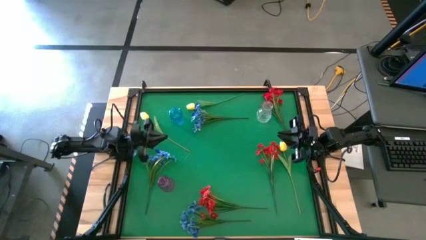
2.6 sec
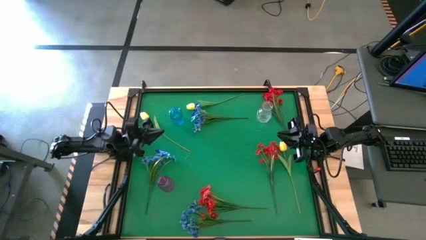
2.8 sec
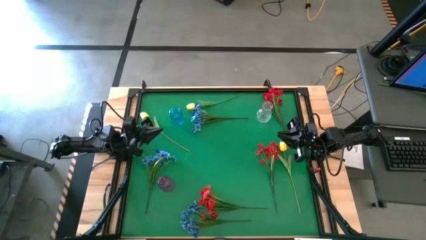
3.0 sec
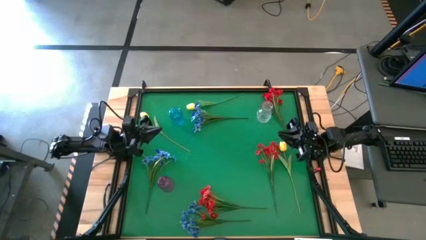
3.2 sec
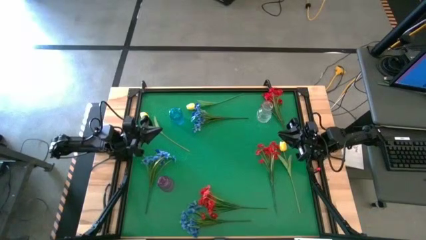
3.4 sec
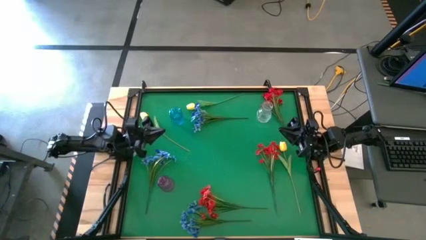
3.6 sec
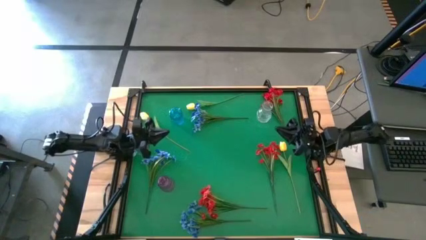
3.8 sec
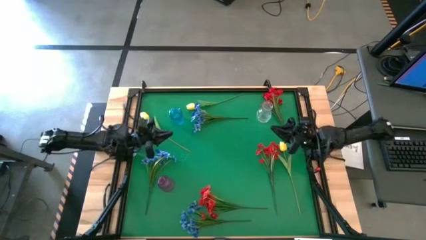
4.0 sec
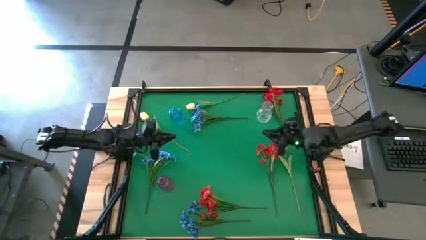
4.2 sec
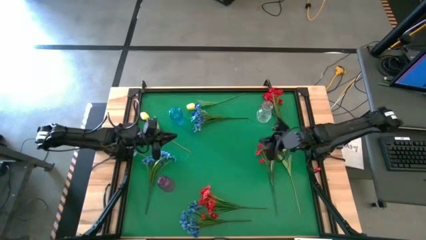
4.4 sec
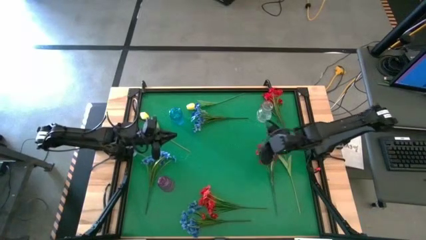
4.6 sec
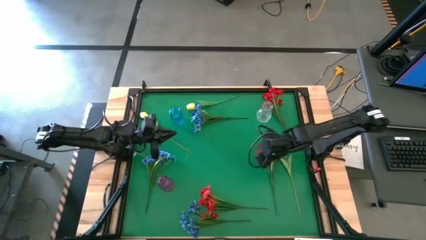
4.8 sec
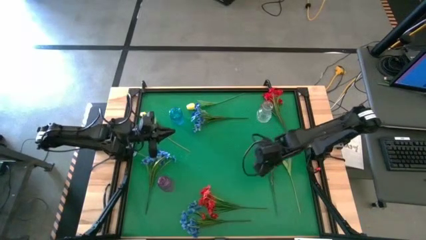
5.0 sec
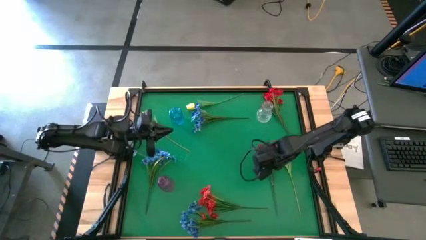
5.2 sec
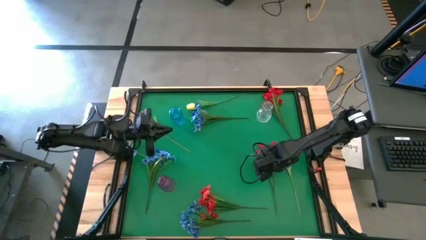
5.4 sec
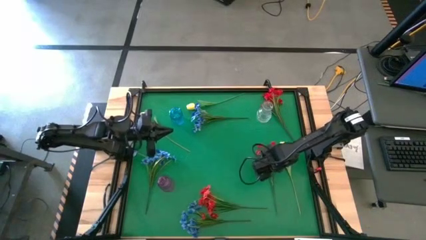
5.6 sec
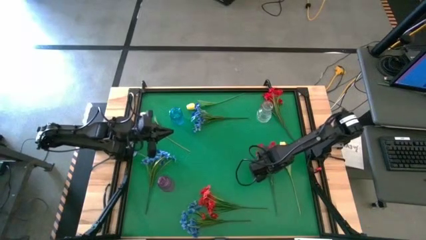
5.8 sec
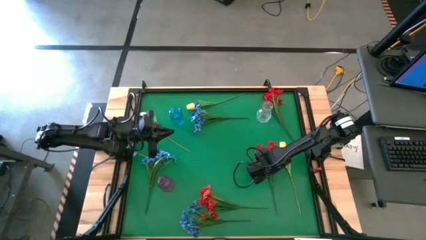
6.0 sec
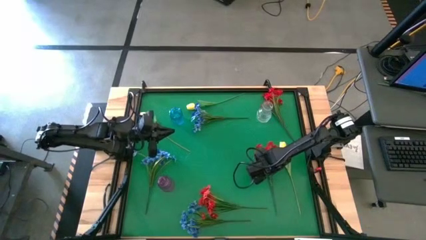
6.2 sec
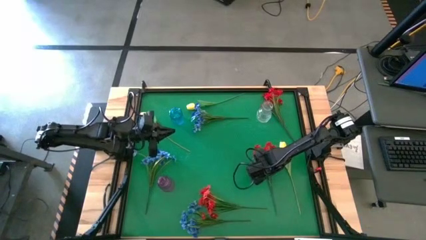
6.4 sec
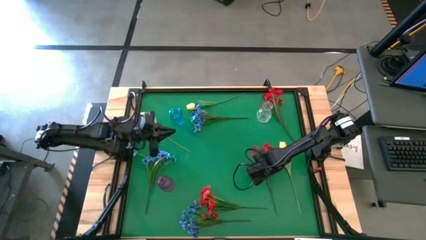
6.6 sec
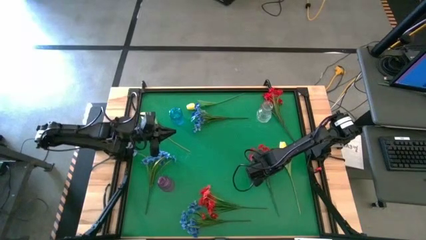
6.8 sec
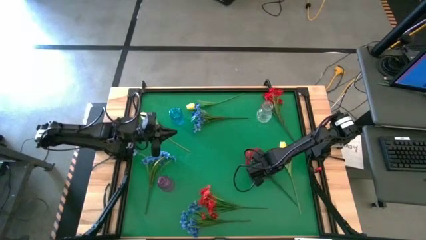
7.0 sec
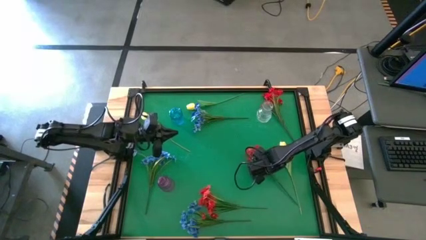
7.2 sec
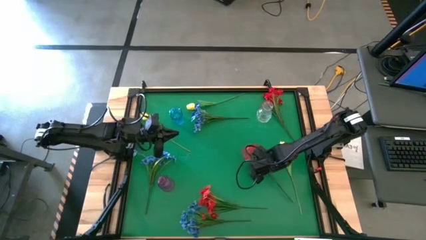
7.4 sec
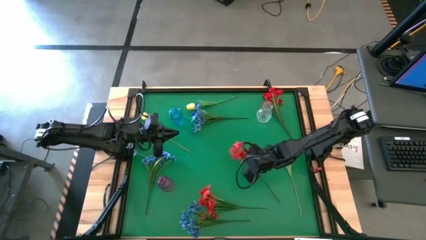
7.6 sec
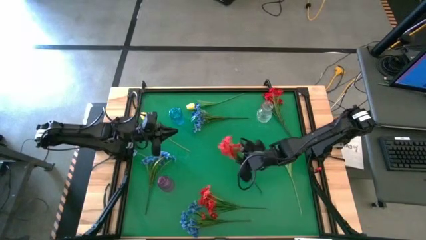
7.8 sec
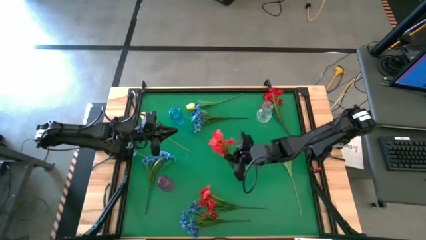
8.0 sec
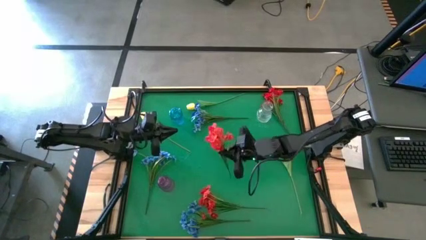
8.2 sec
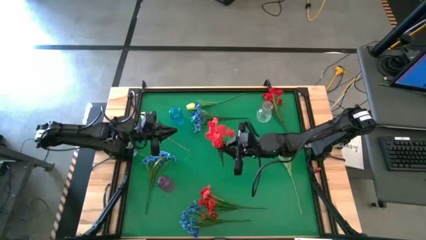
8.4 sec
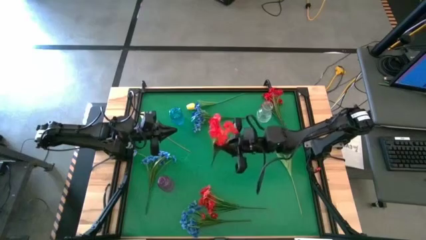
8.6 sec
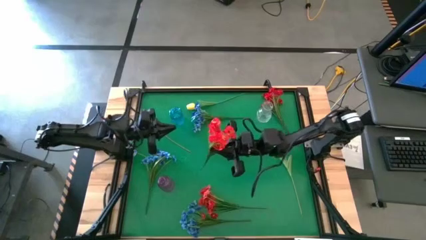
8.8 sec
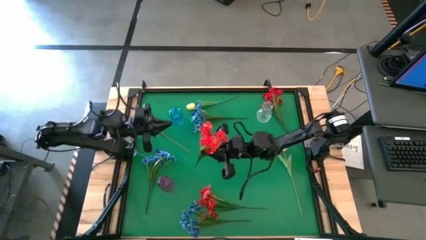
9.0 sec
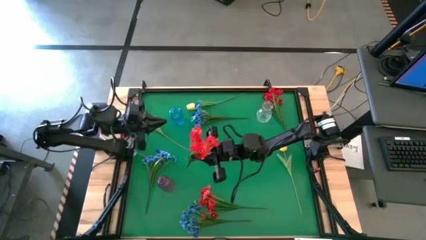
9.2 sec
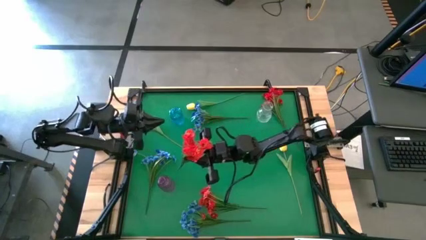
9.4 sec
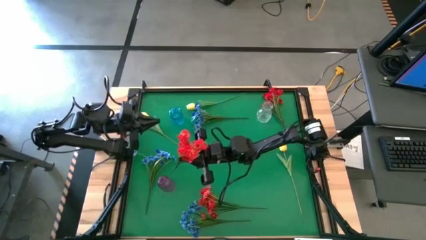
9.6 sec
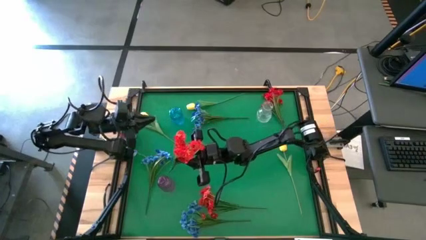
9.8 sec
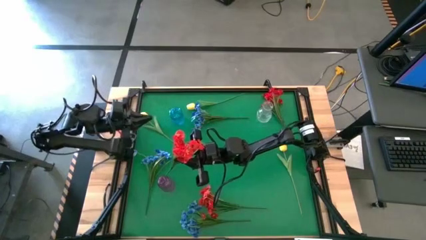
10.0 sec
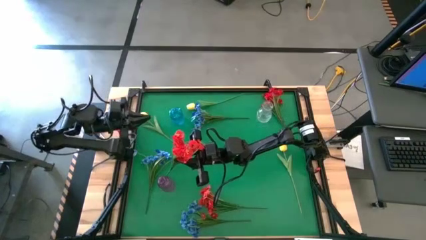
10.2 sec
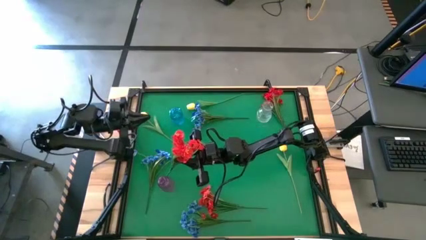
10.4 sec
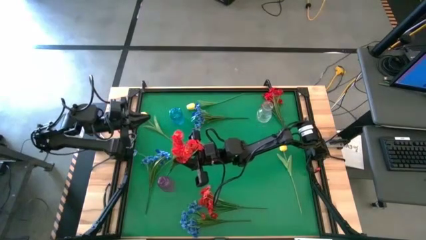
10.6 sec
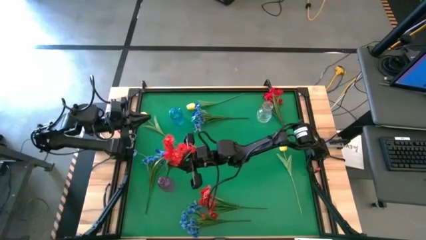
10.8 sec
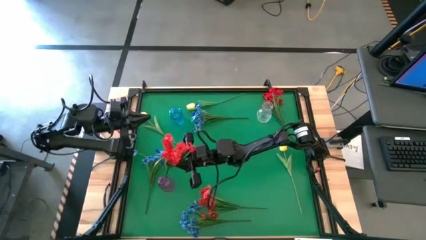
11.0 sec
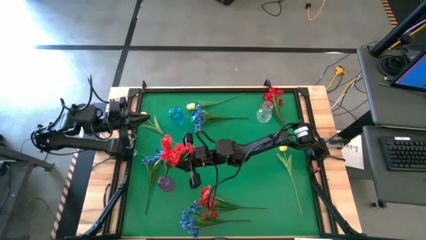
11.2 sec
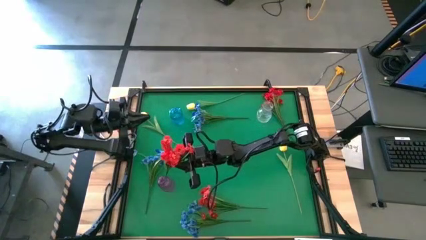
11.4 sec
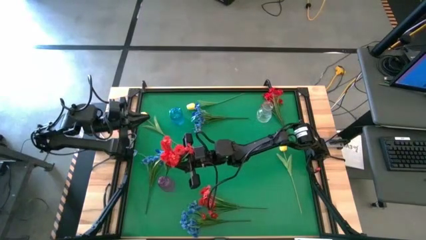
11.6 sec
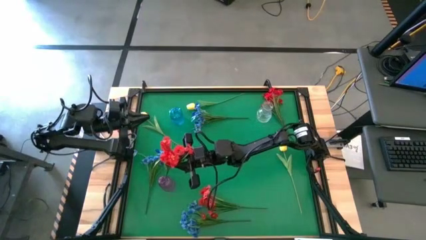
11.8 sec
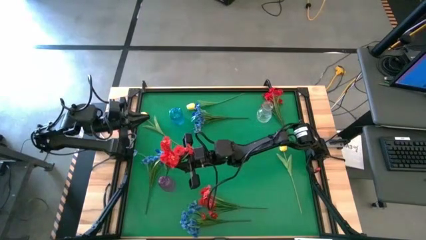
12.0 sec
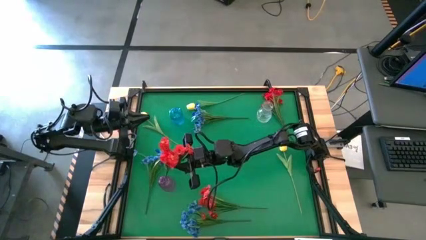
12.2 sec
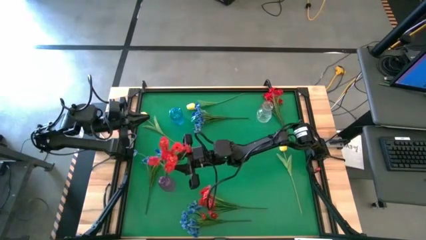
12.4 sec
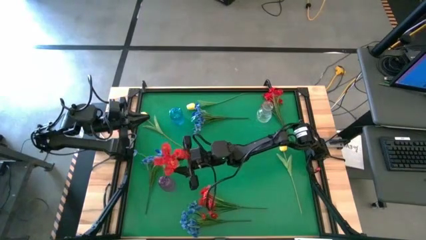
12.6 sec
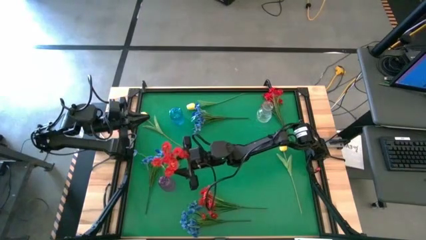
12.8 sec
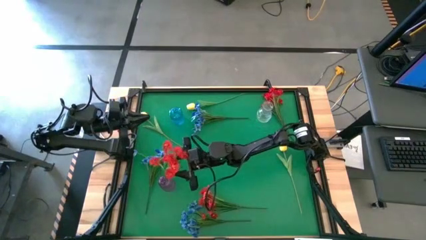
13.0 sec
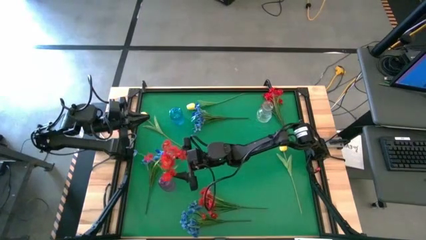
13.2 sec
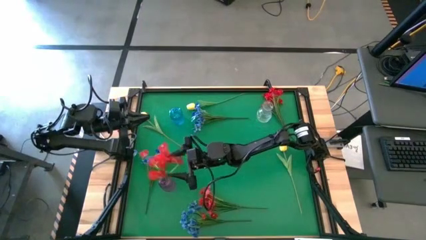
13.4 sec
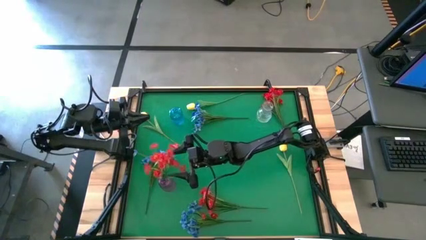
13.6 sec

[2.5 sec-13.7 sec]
Task: Sort flowers into vase by color
Put the middle right red flowers into the purple vase
